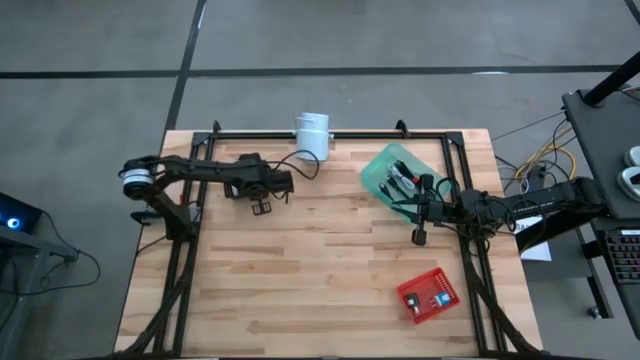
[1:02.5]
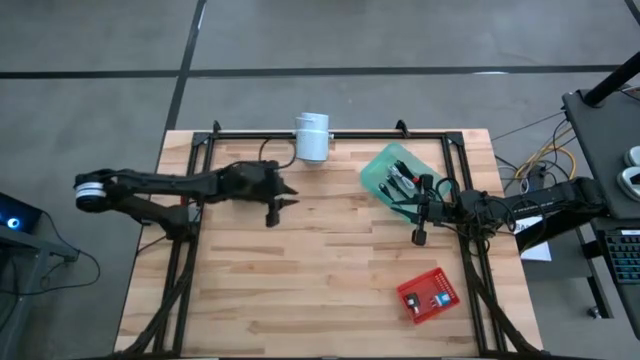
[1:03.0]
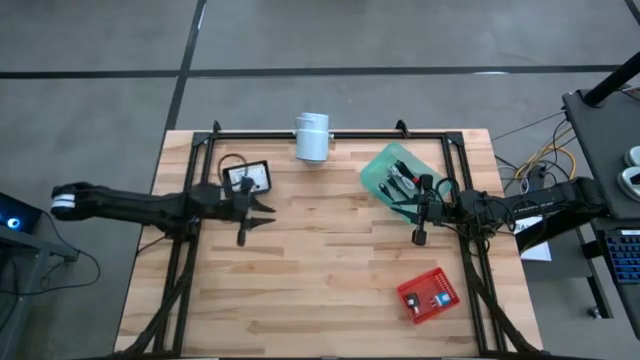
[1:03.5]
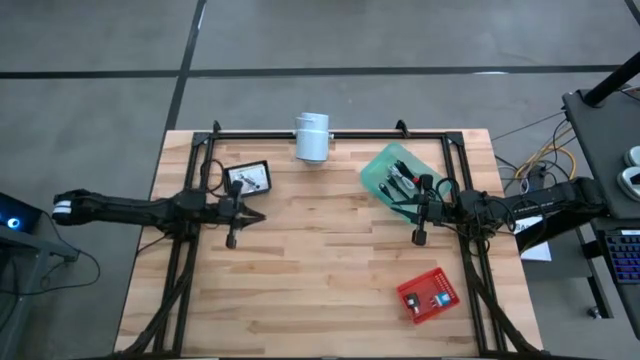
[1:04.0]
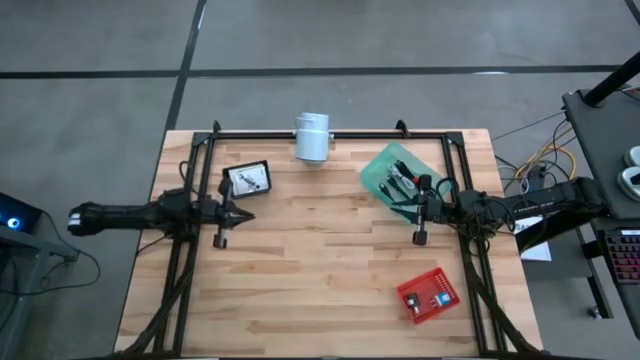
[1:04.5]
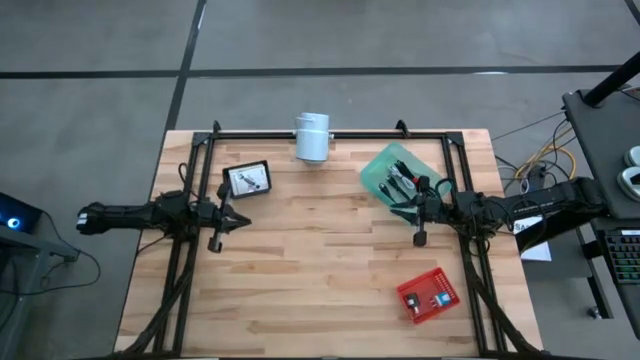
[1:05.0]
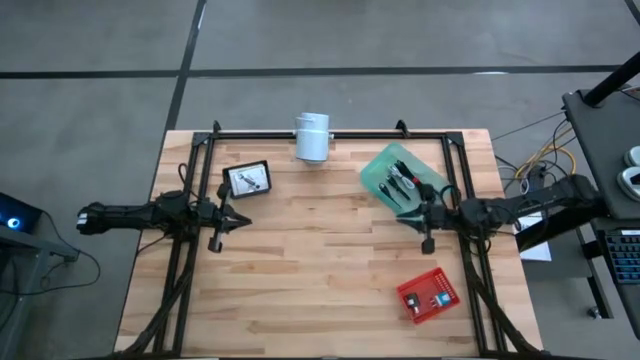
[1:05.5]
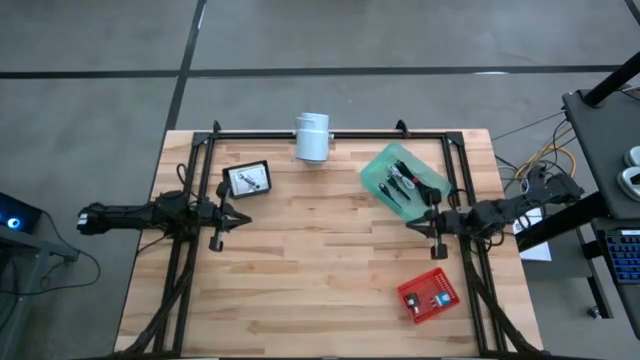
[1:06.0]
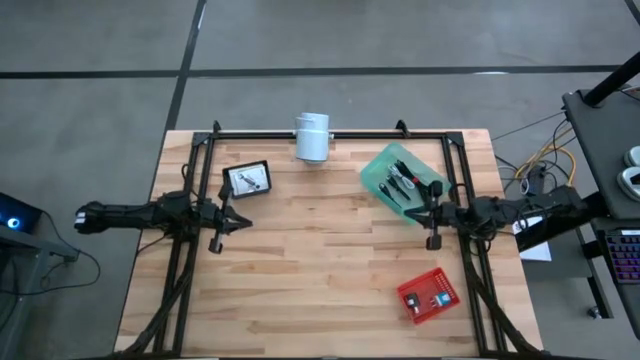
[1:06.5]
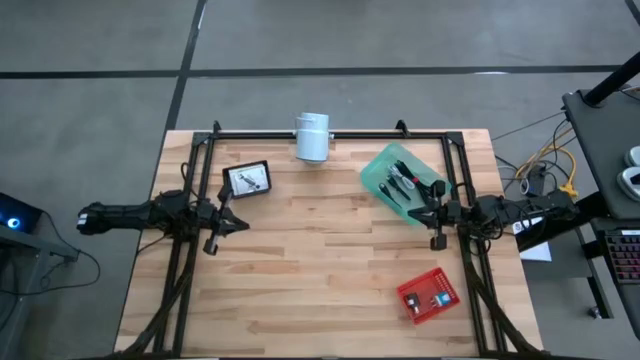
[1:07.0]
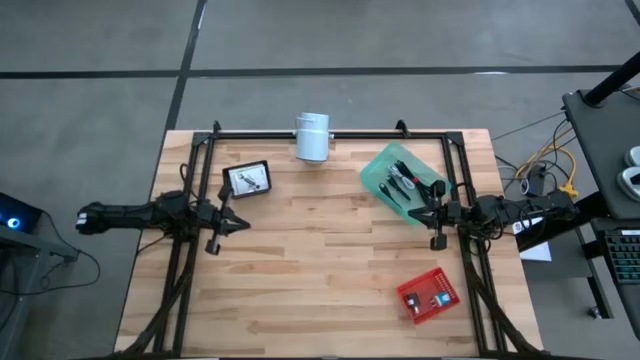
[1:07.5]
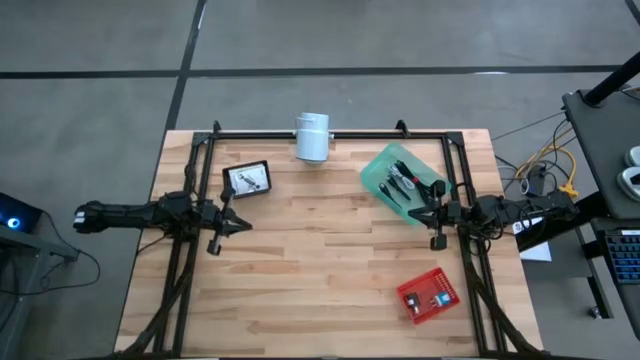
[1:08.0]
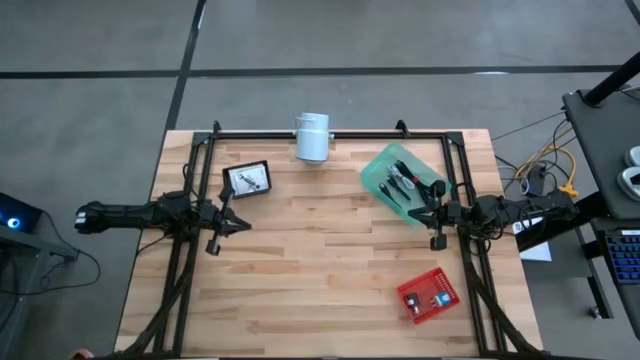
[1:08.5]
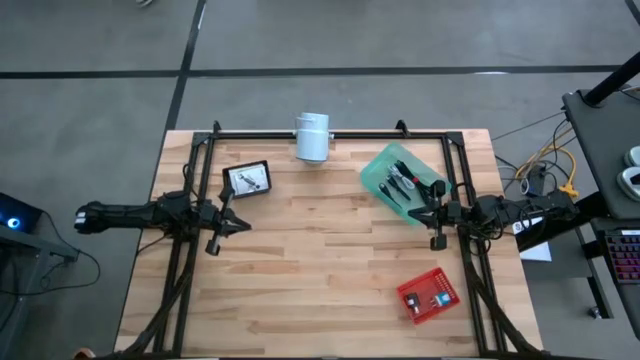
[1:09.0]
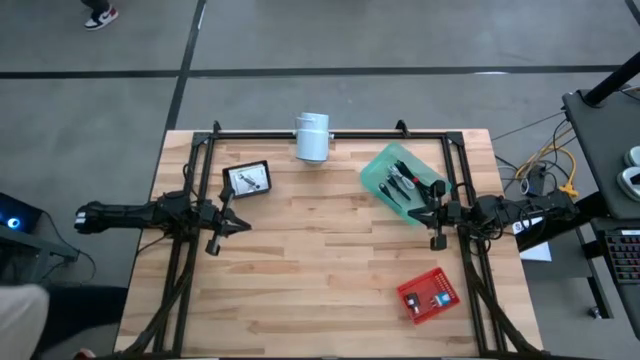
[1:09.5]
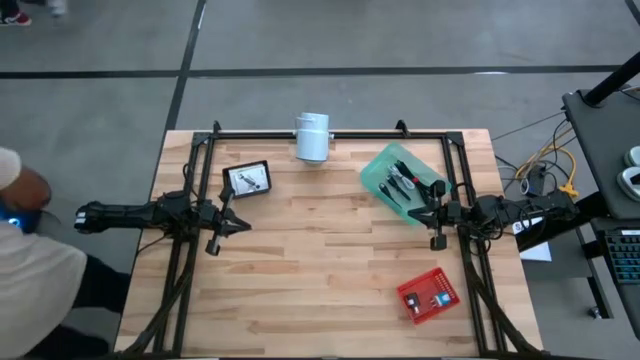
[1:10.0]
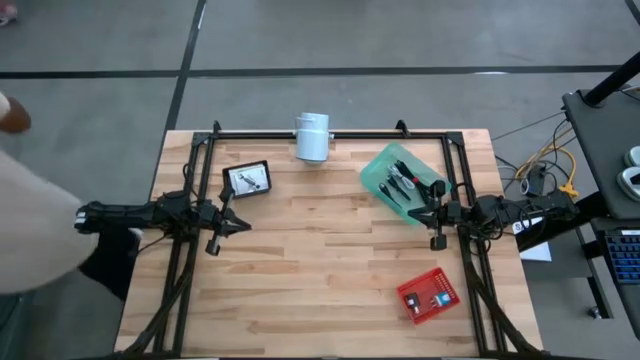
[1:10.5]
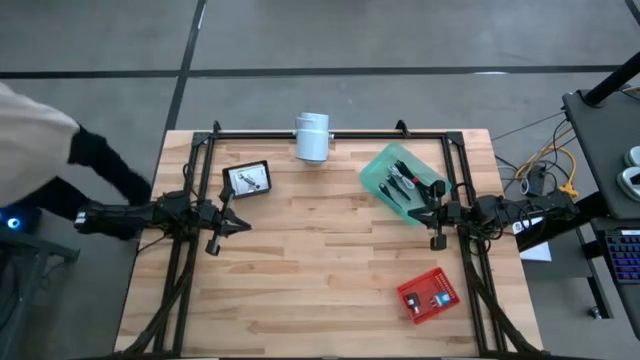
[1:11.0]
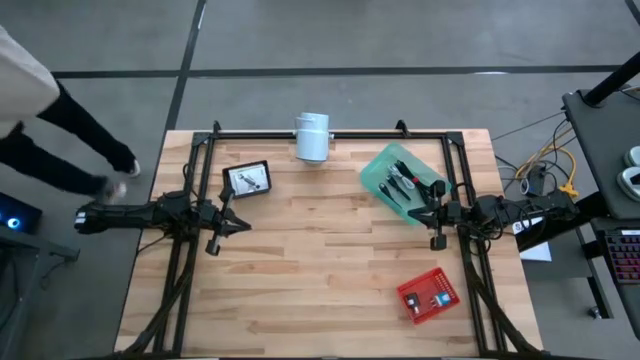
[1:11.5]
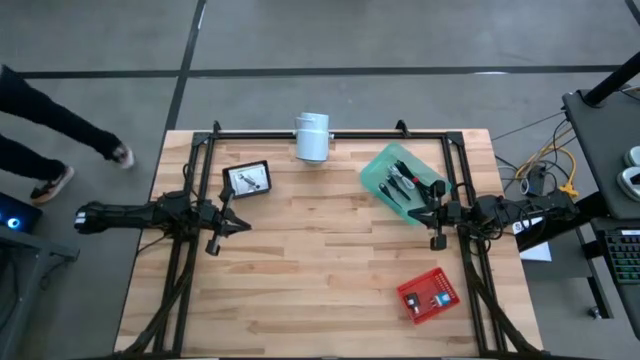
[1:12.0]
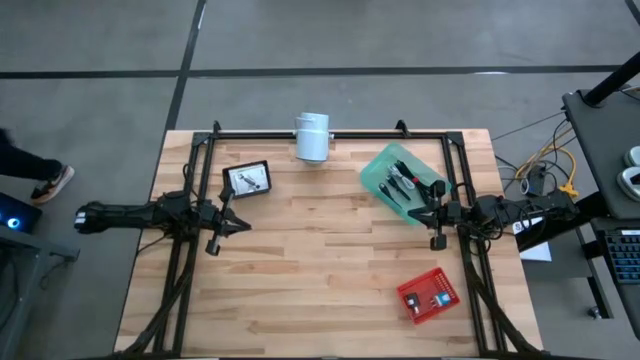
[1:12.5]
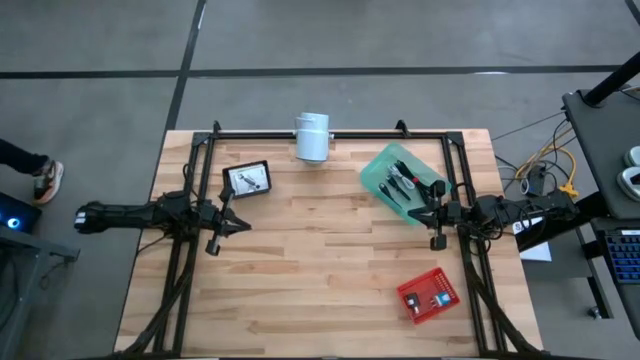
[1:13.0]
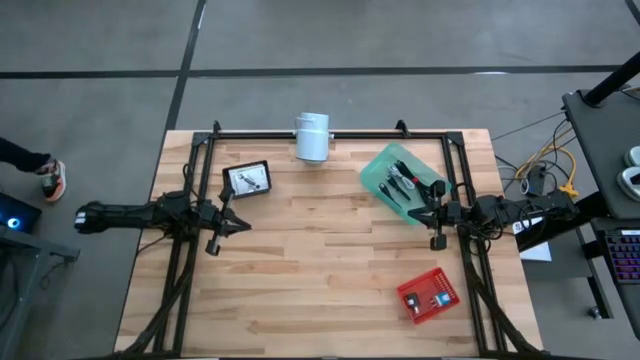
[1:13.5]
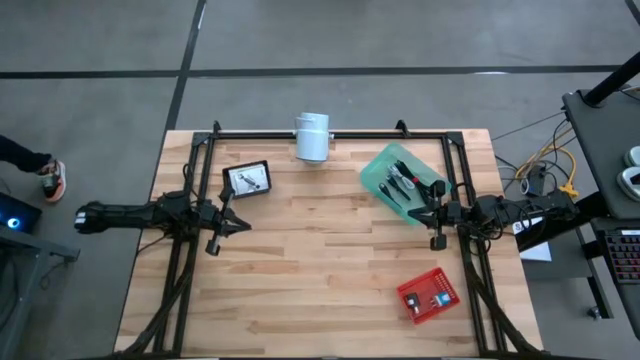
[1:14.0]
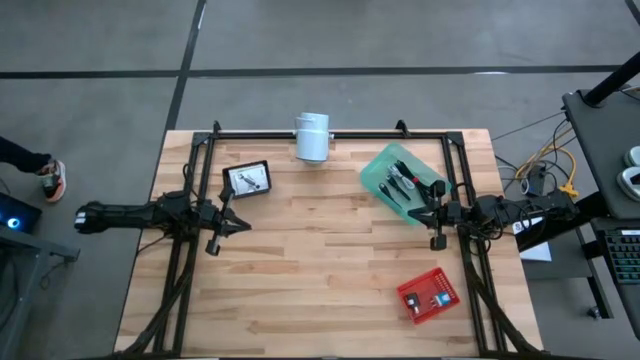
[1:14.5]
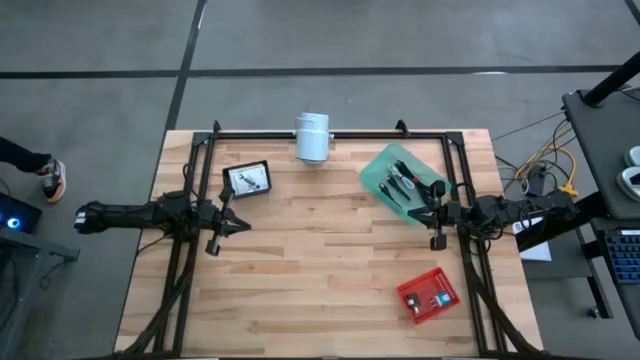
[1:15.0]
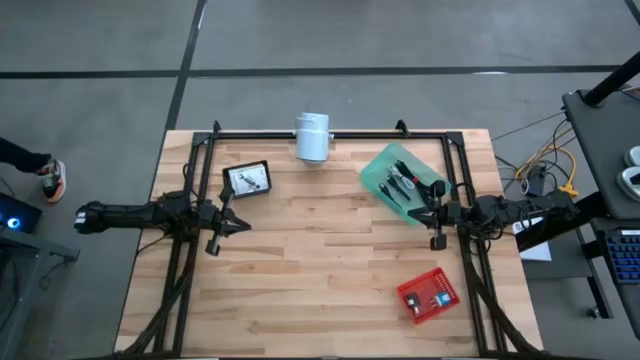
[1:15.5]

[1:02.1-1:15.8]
Task: Pick and place items into bin
Return to Home Position

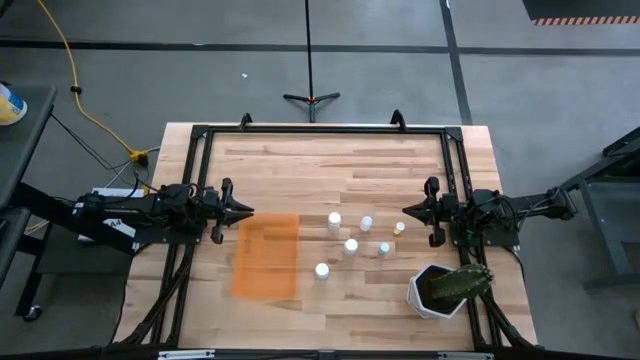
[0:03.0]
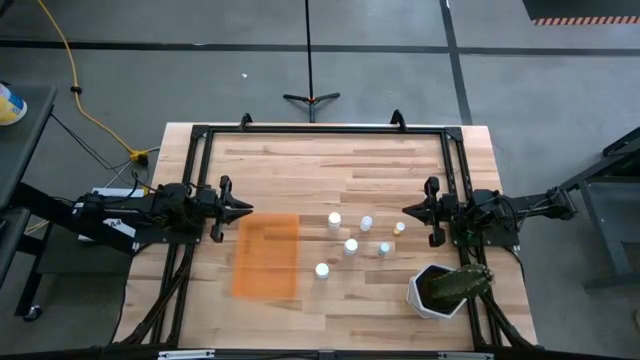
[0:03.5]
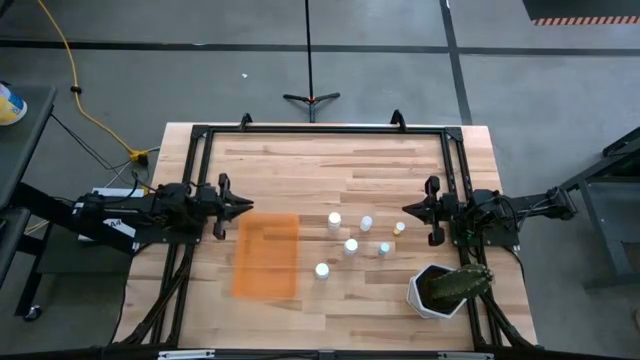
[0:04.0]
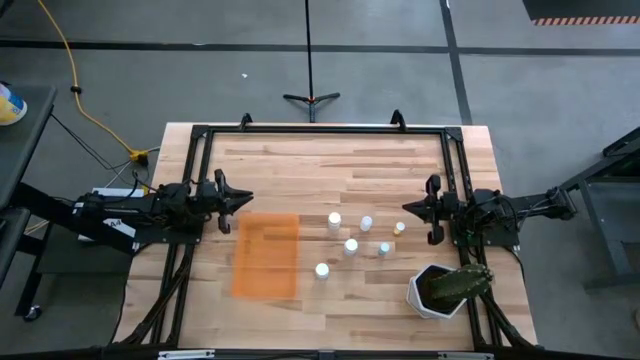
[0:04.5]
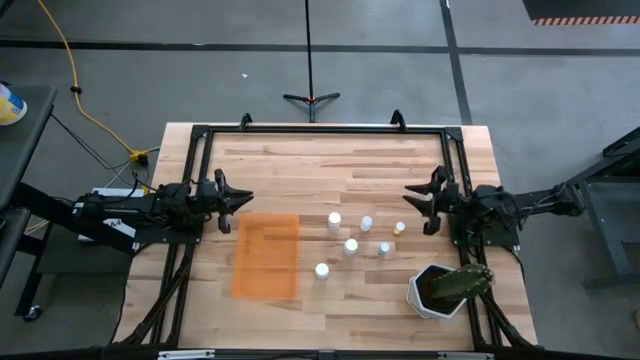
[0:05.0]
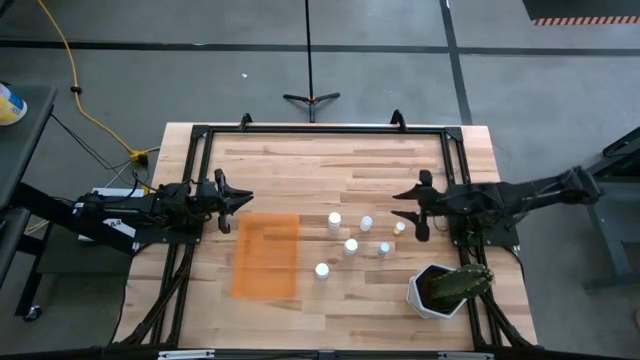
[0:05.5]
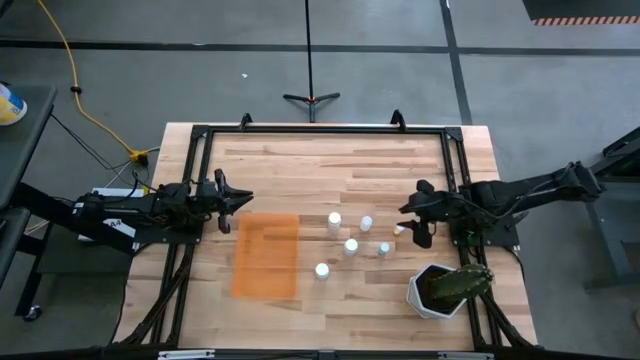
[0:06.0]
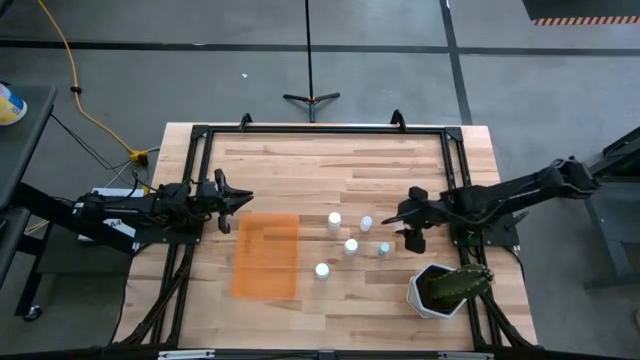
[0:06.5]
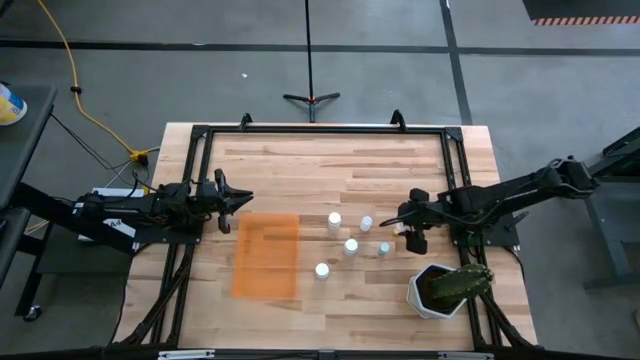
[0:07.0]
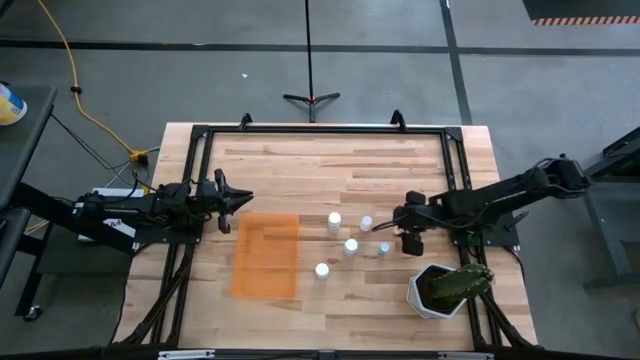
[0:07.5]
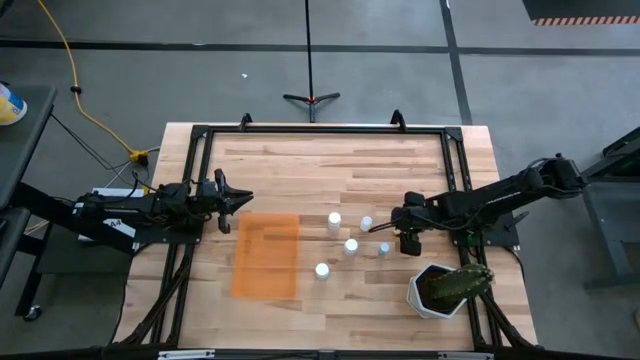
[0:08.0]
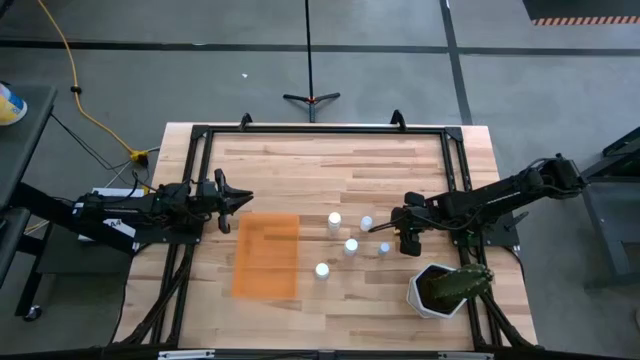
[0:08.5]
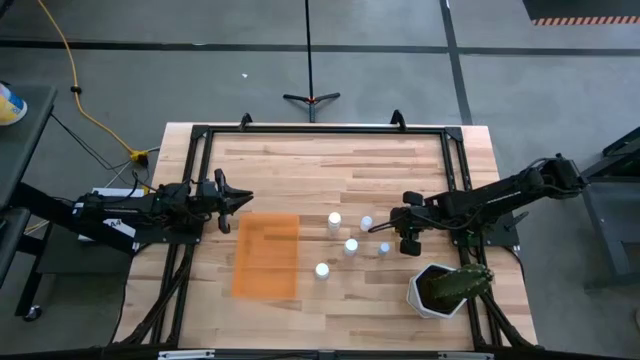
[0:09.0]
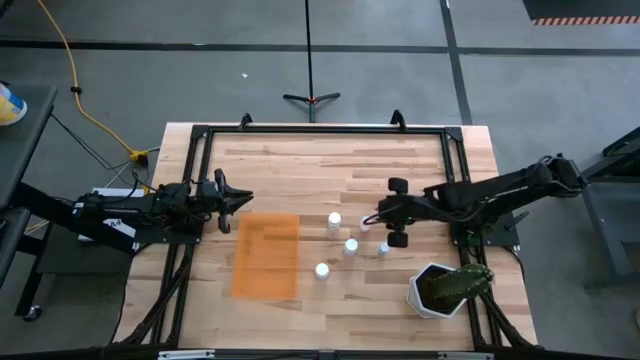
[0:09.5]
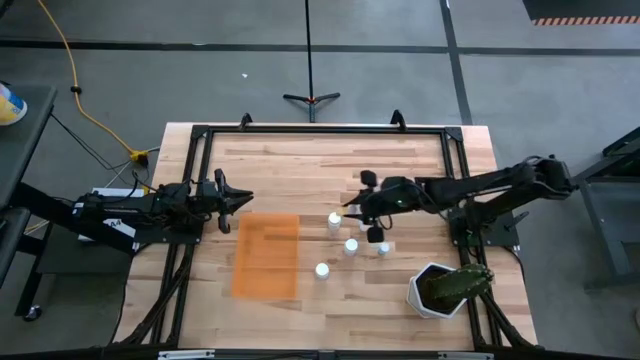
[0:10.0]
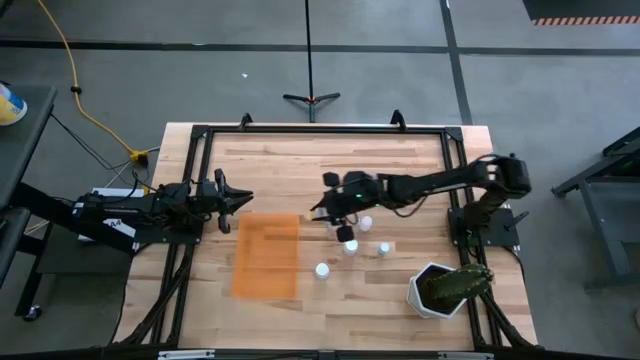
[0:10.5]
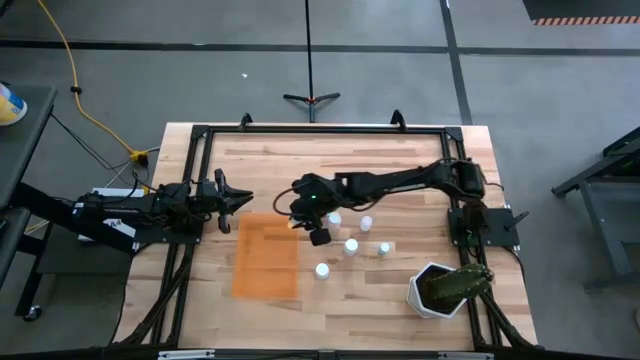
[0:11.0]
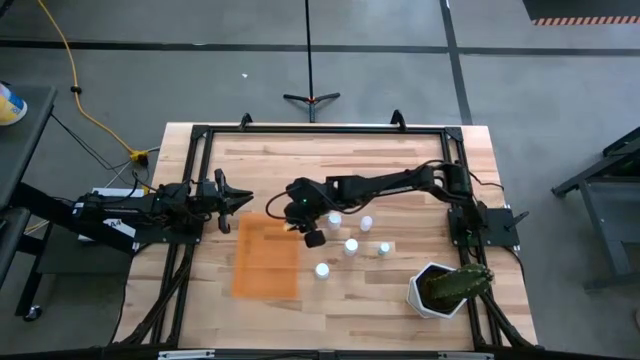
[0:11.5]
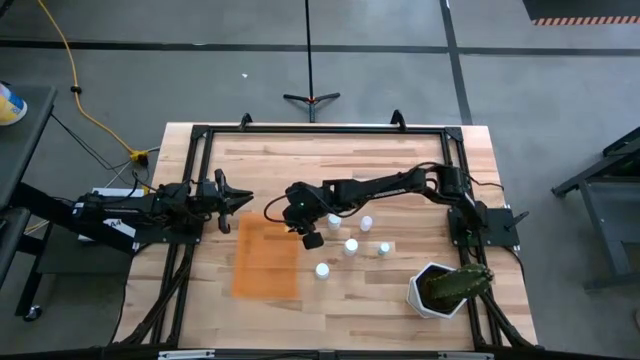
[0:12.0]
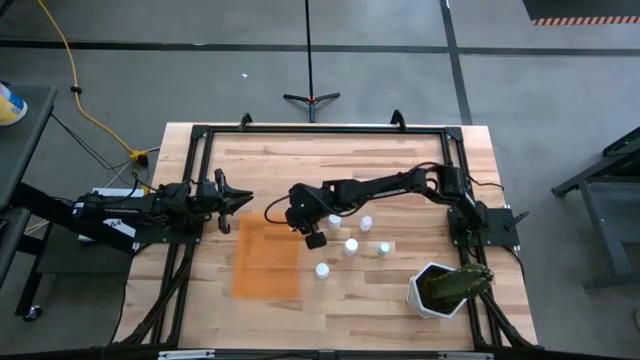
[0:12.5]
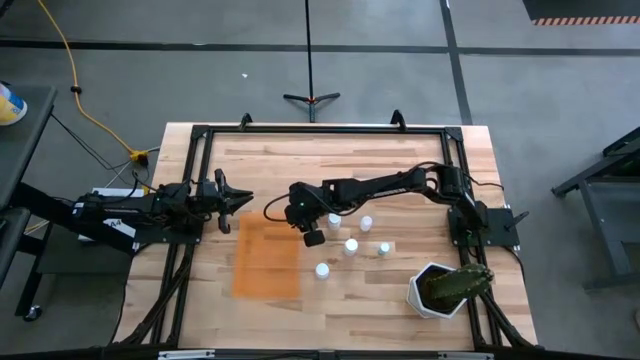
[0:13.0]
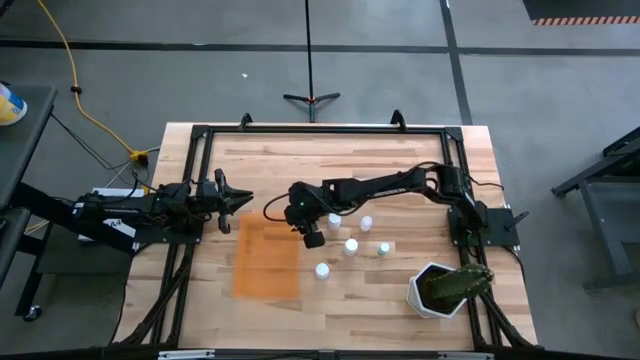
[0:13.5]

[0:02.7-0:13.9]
Task: Pick and place pill bottles into a basket
Put the yellow pill bottle into the orange bin
